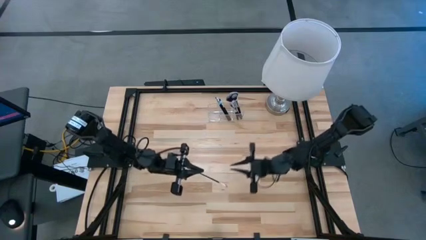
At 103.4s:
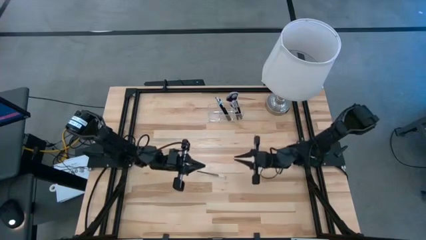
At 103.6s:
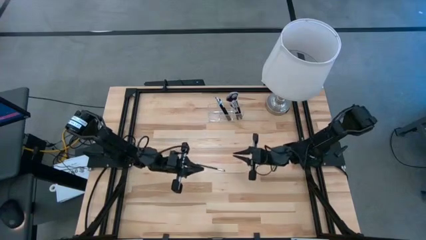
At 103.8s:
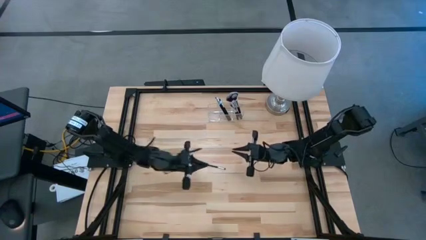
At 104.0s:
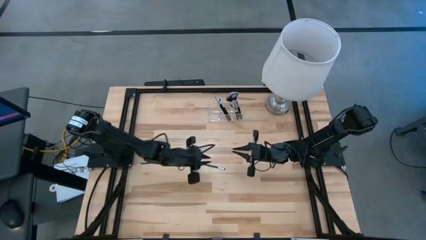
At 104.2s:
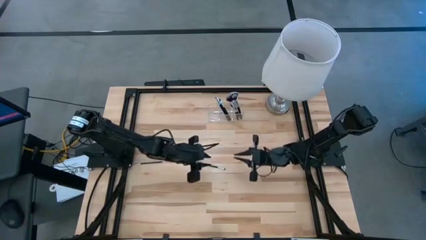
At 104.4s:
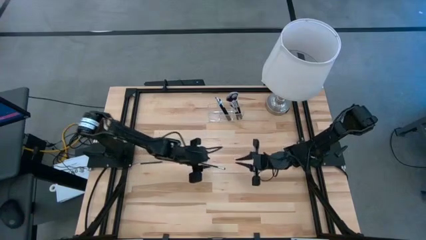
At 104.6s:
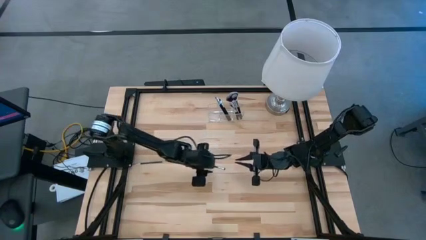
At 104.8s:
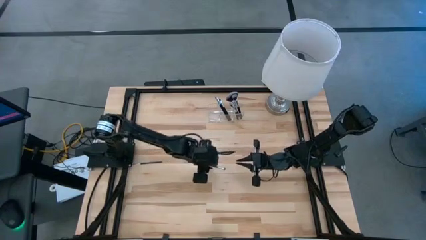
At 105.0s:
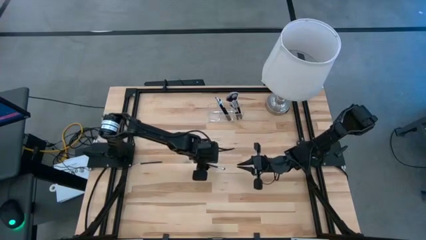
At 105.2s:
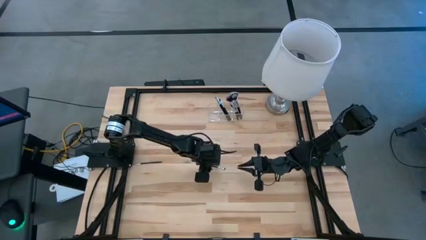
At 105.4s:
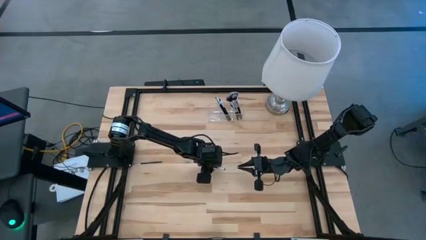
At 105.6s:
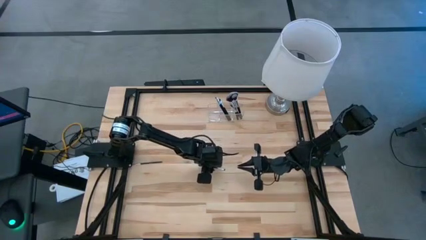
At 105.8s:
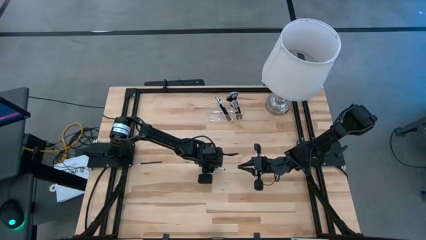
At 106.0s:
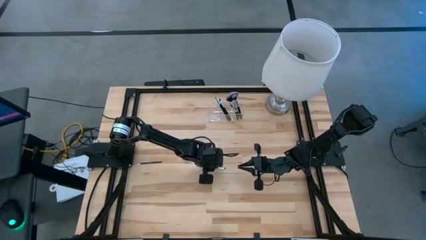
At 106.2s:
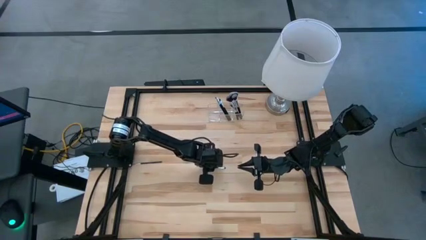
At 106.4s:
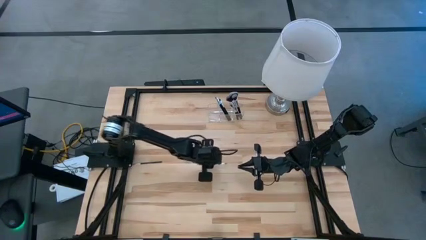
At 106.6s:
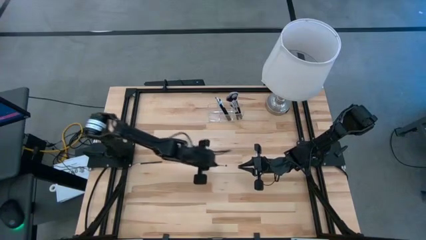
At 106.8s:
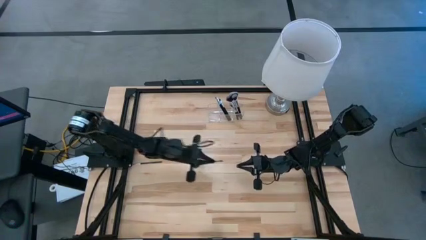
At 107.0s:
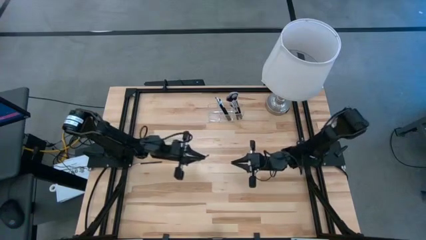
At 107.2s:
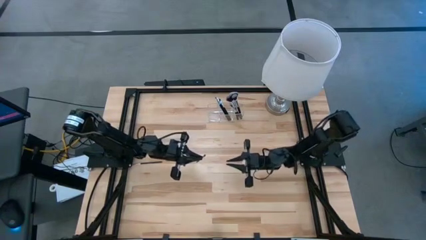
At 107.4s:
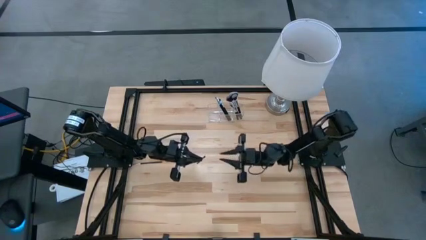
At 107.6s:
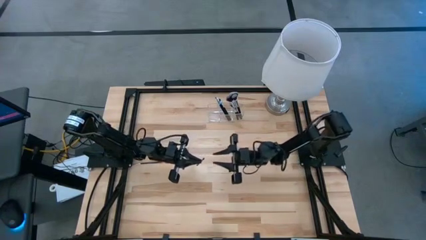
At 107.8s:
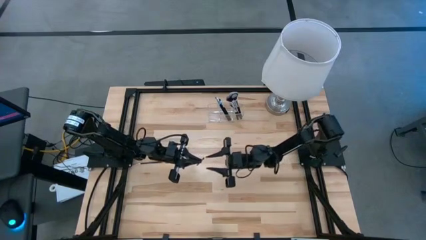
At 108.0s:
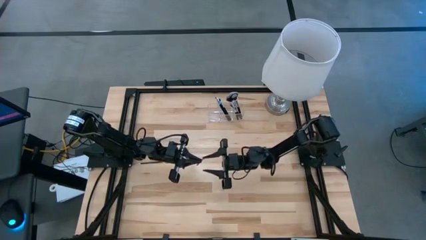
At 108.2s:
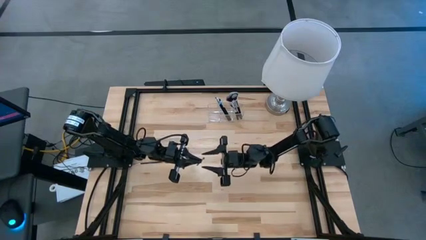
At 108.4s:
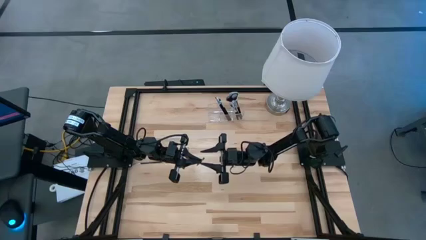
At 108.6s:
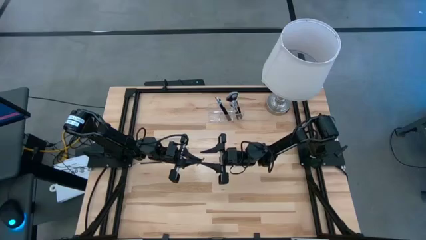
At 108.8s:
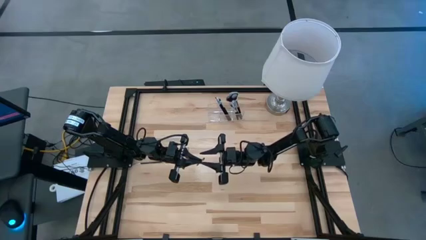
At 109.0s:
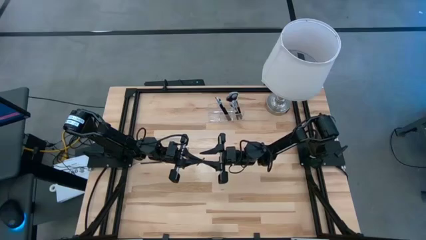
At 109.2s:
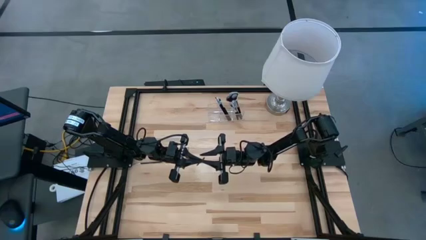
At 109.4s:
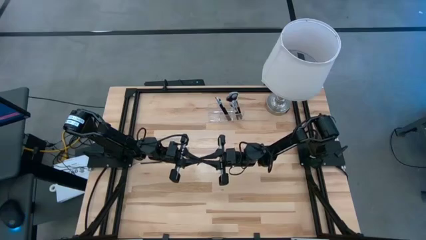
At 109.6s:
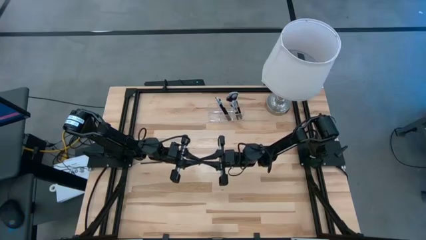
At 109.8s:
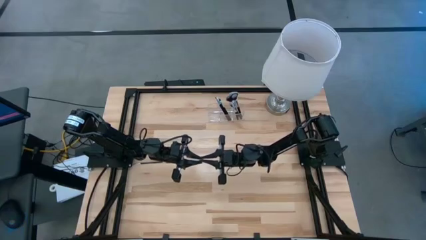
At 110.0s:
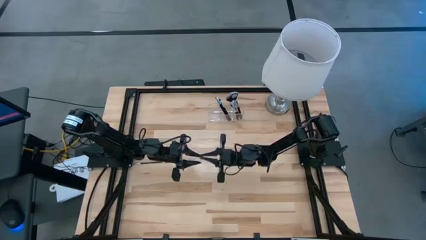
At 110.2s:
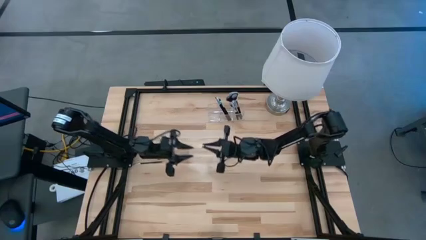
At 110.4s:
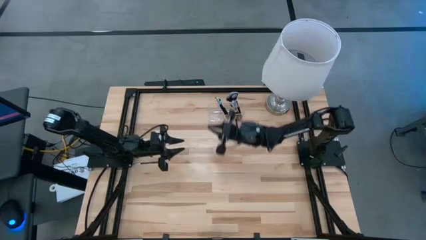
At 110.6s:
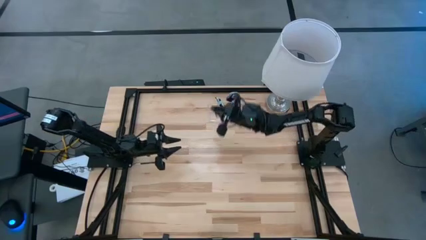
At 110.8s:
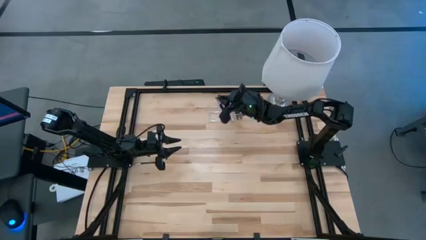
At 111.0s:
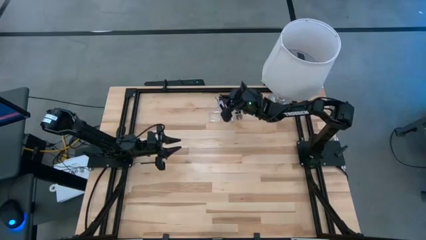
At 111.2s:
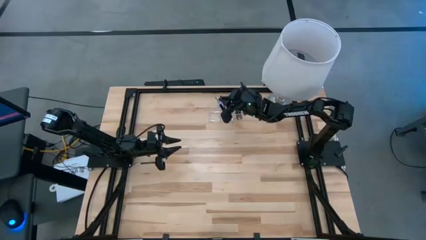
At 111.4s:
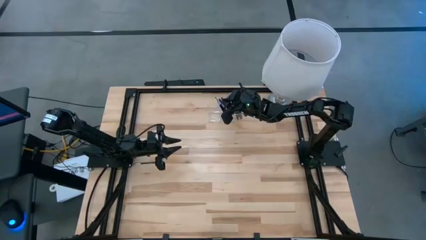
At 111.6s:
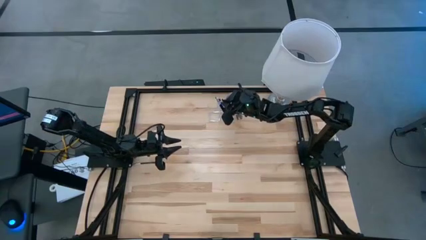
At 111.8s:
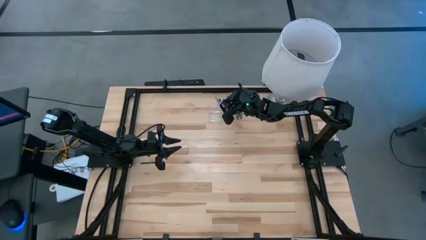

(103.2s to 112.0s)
Task: Put items in baskets/containers
Put the silver eyeshadow brush into the transparent organizer

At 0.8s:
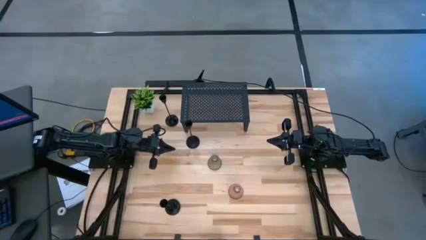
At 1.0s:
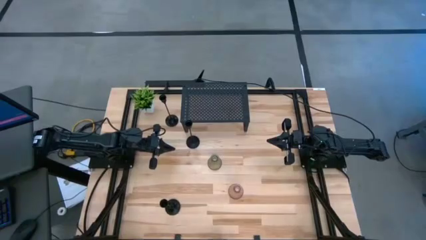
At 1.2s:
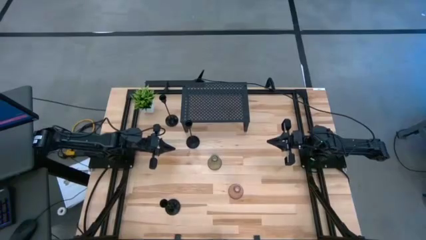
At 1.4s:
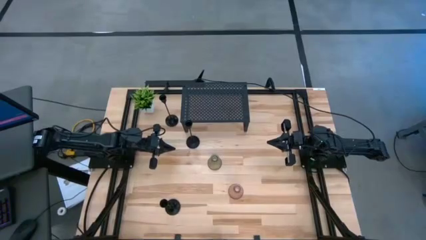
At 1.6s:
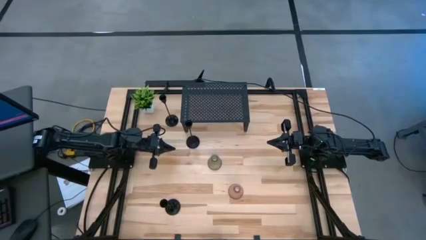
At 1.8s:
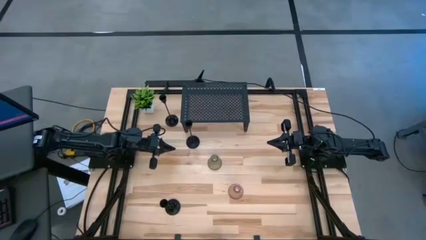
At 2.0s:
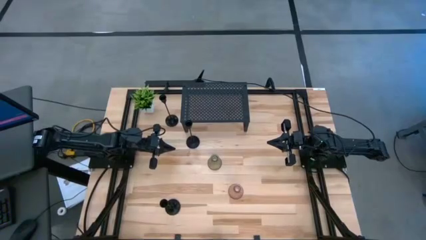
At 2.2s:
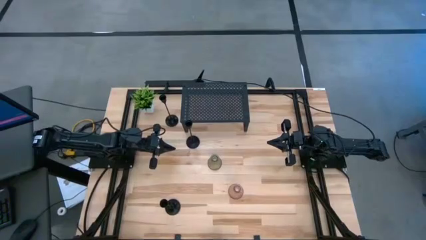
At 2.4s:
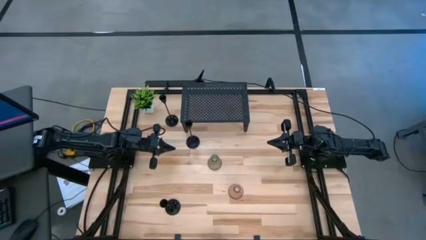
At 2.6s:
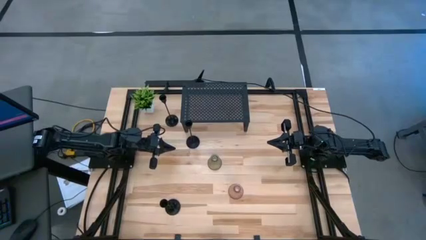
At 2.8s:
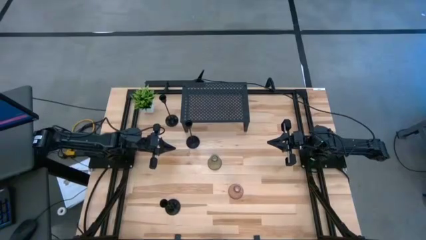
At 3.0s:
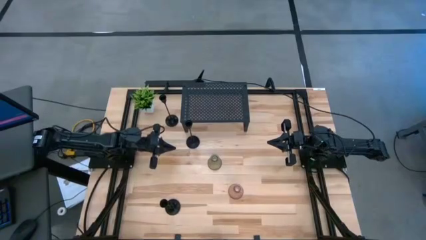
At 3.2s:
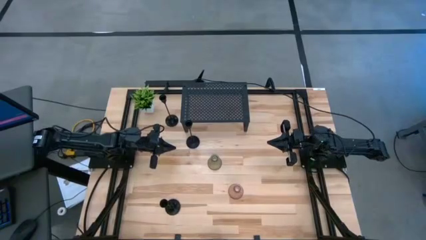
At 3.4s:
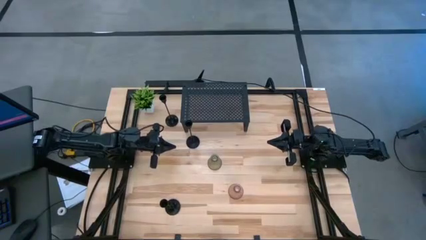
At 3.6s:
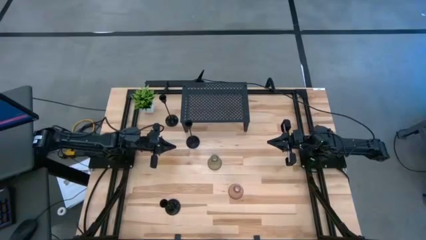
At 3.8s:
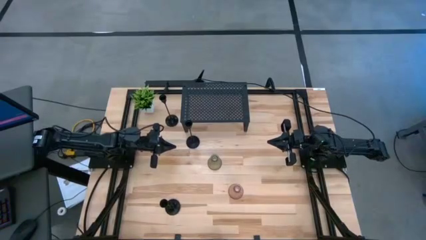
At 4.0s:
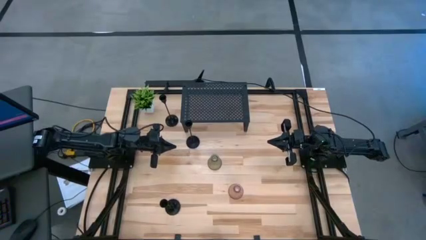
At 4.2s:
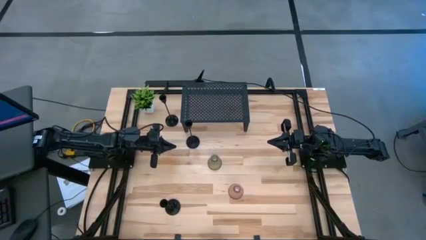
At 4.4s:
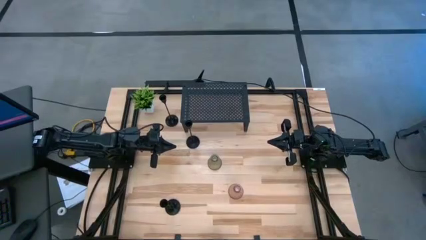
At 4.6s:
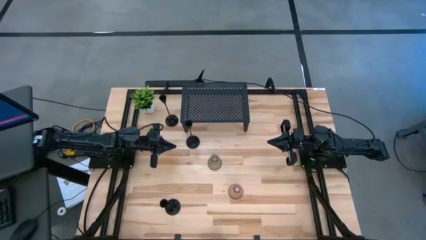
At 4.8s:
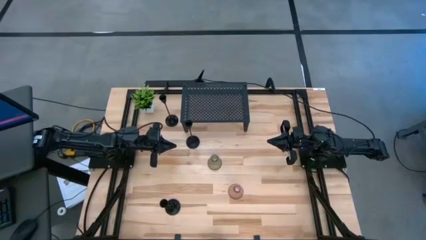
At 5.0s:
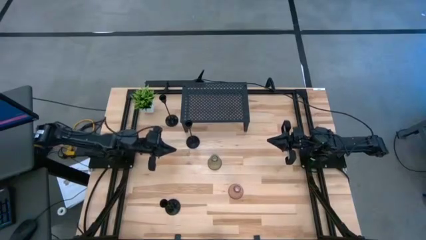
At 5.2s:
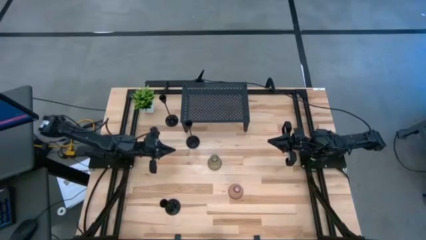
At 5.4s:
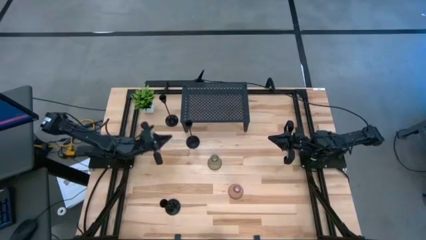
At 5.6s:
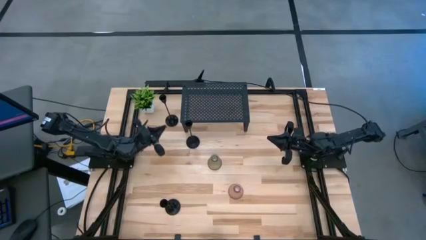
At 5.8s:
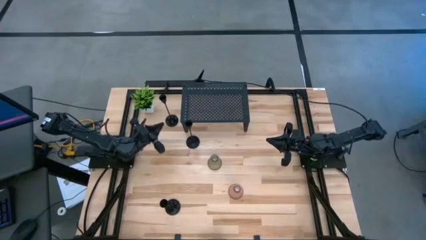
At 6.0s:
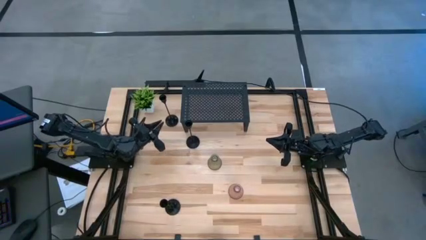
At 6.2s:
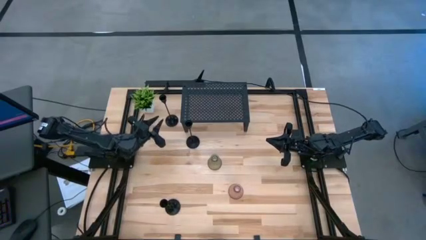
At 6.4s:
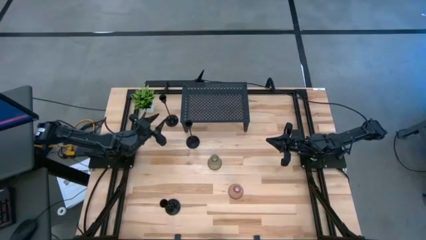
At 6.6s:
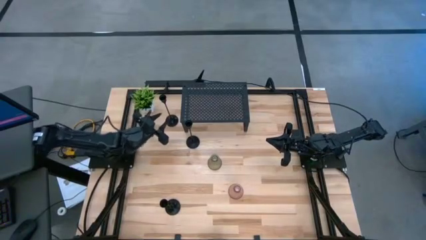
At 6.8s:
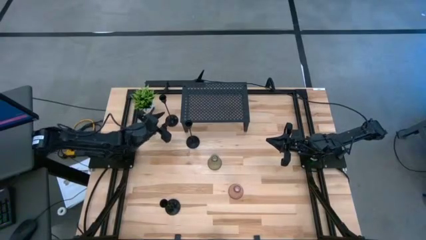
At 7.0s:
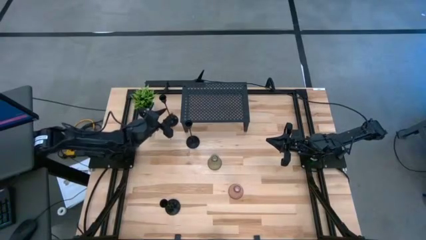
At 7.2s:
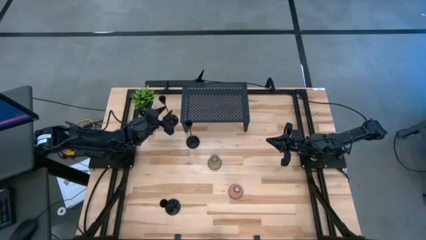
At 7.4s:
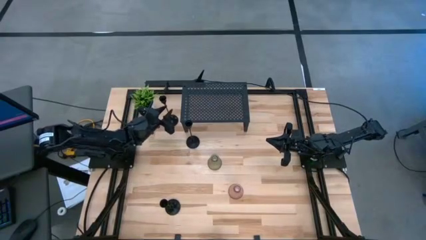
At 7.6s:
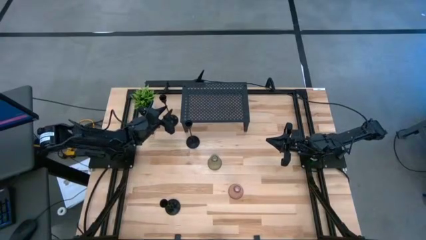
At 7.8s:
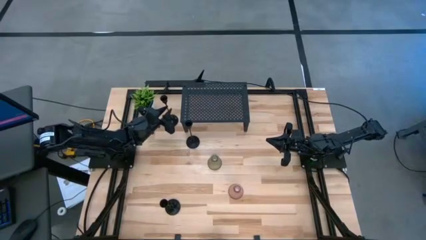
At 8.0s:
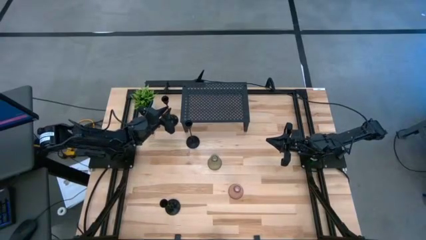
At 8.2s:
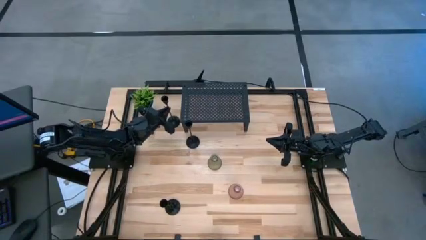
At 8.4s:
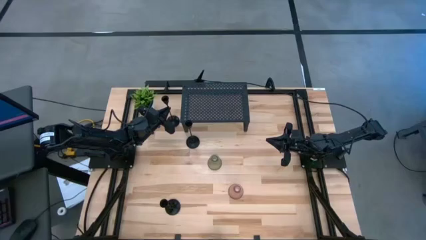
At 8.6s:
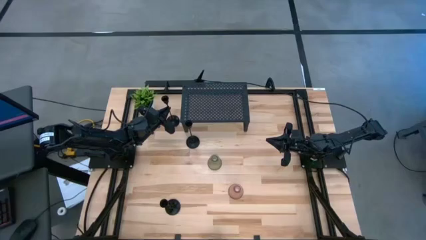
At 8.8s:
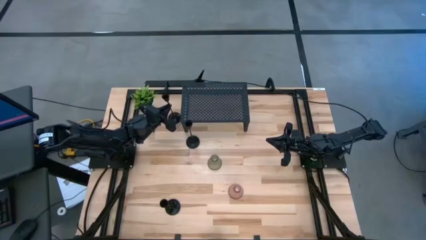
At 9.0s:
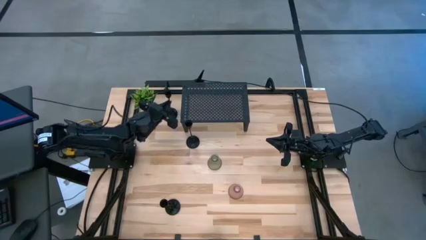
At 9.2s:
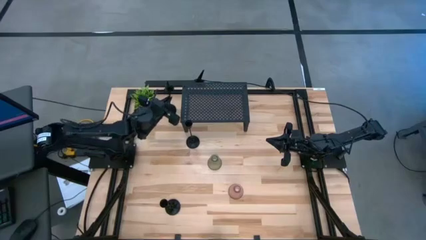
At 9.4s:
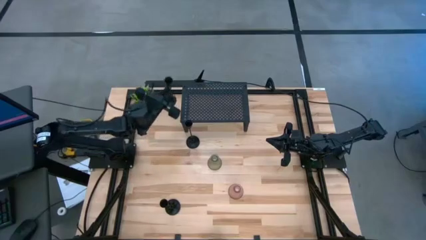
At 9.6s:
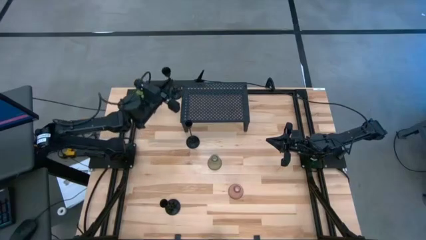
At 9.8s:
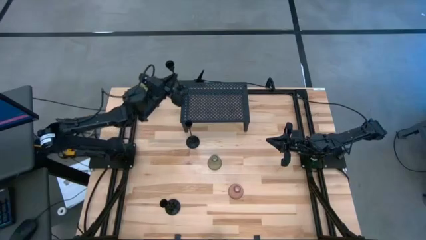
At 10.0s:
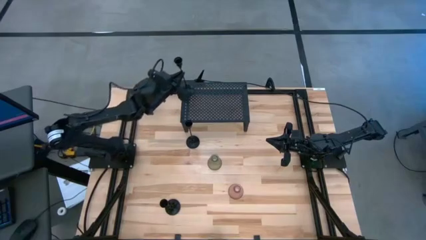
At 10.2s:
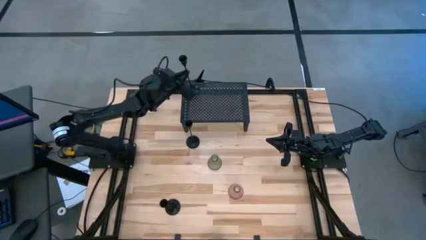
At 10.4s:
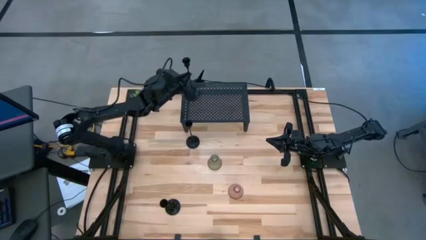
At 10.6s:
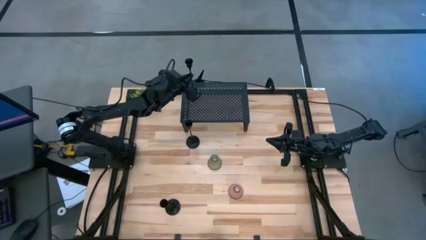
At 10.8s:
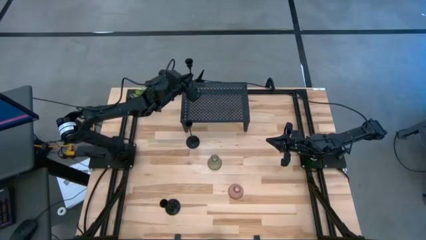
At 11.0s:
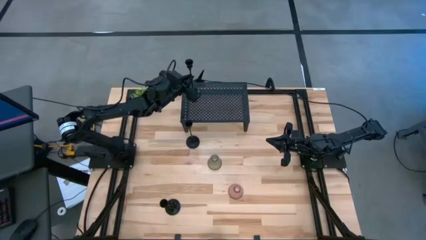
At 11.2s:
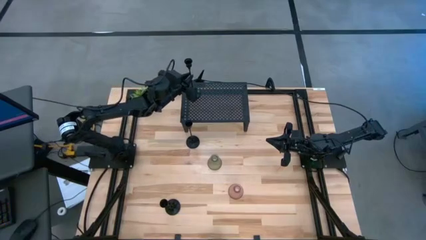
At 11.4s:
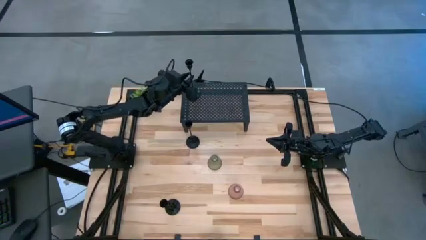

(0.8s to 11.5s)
Task: Pick & Place candle stick holders
Put the top black candle holder on the shelf
